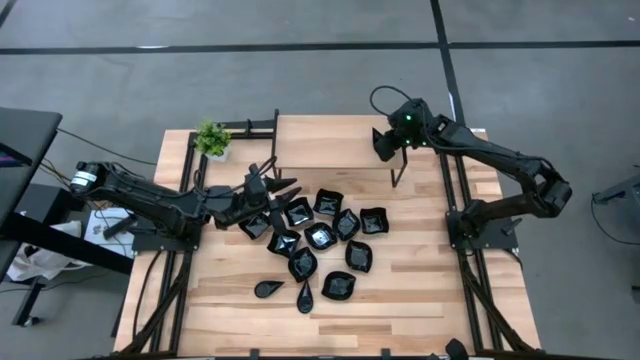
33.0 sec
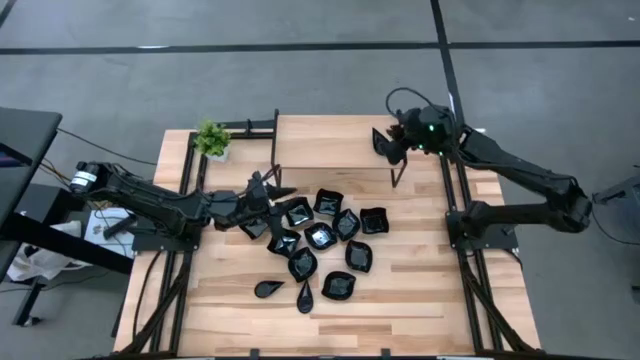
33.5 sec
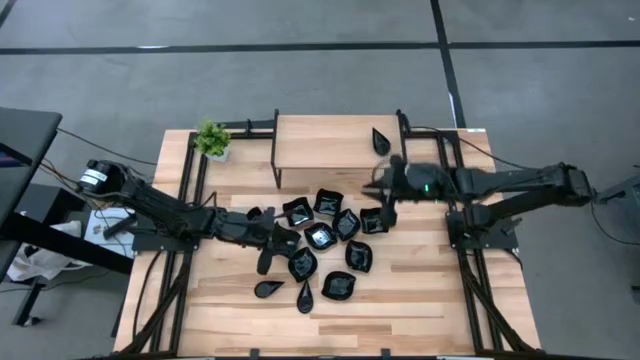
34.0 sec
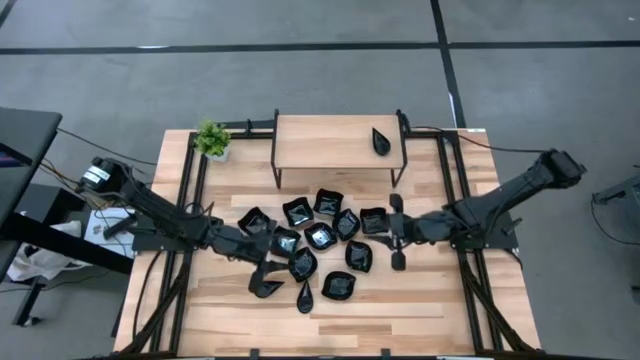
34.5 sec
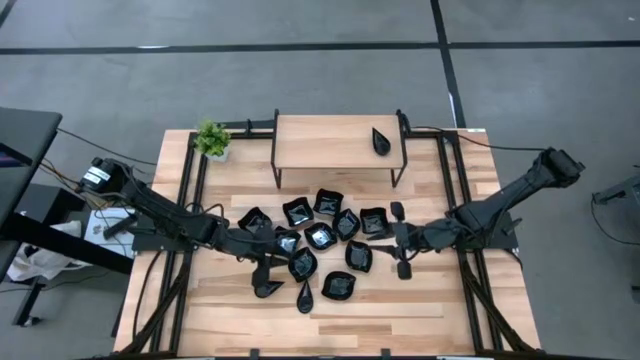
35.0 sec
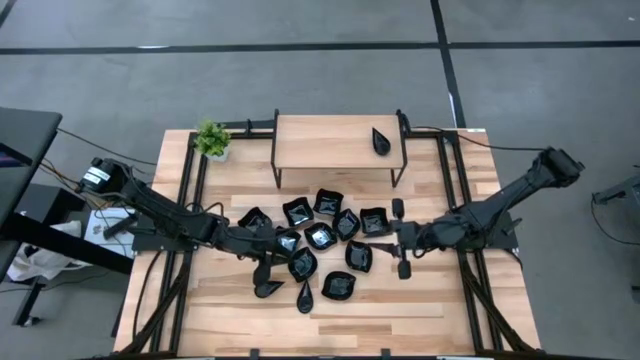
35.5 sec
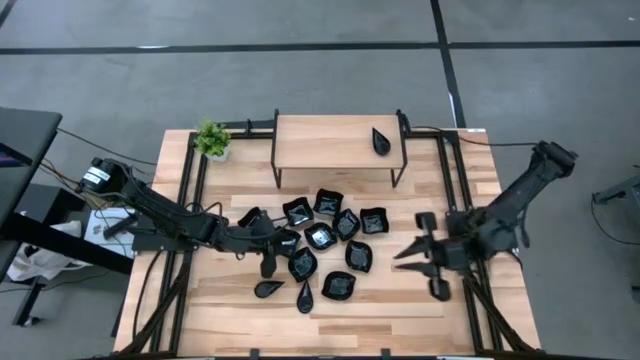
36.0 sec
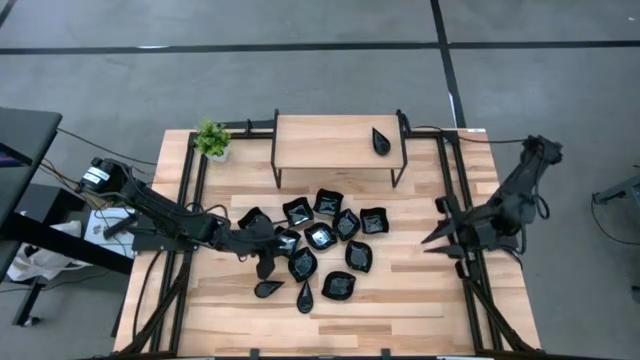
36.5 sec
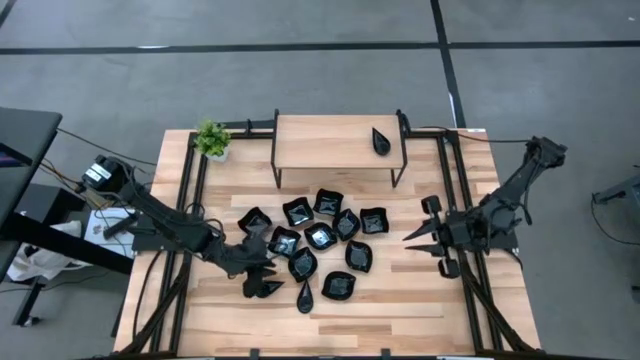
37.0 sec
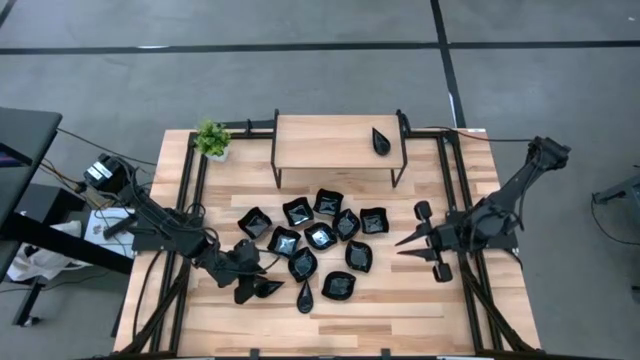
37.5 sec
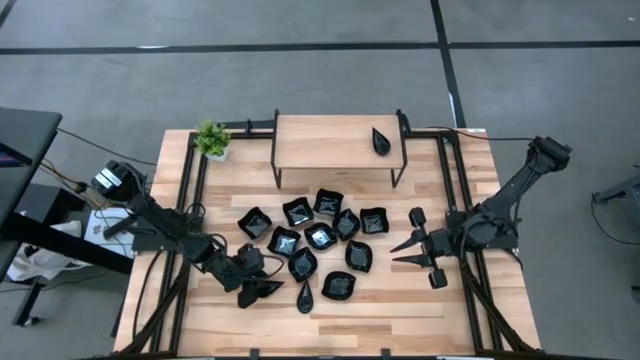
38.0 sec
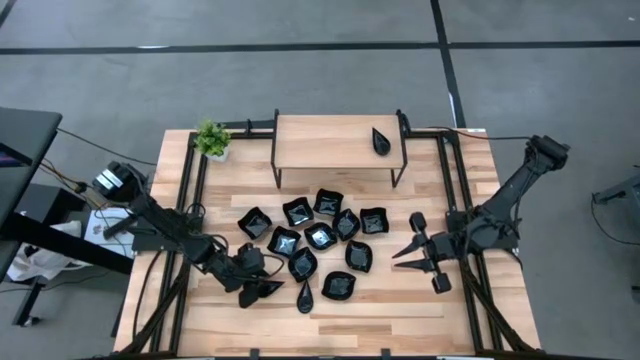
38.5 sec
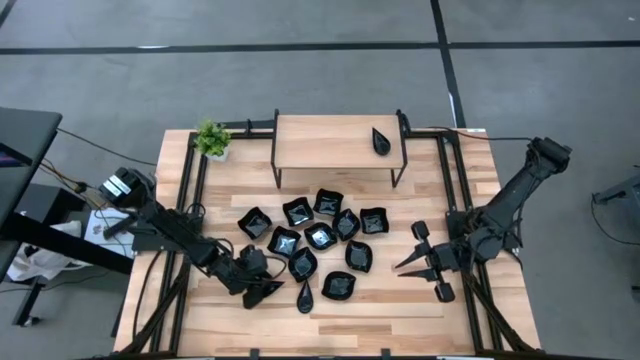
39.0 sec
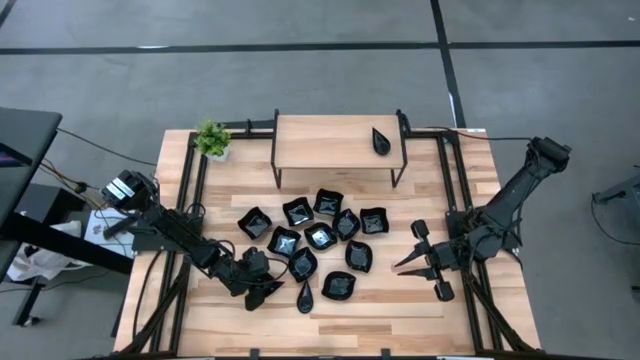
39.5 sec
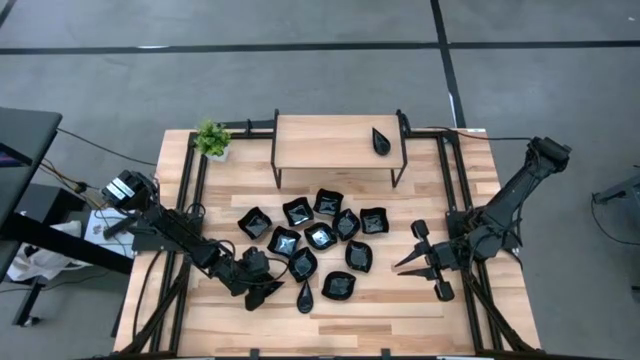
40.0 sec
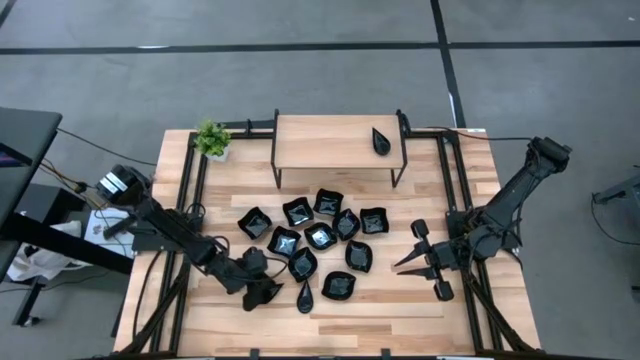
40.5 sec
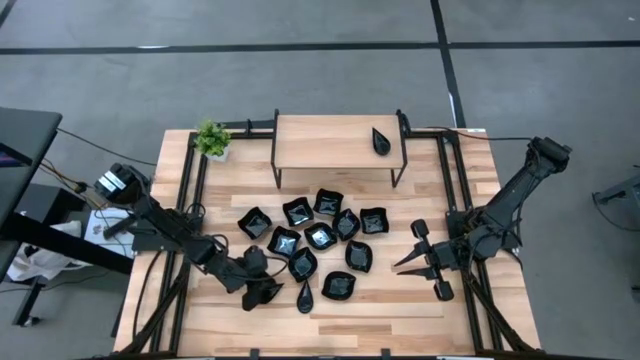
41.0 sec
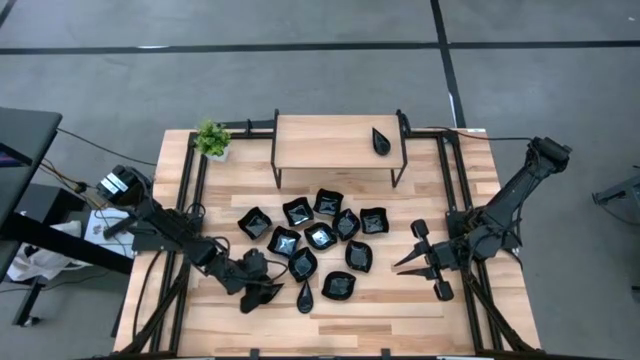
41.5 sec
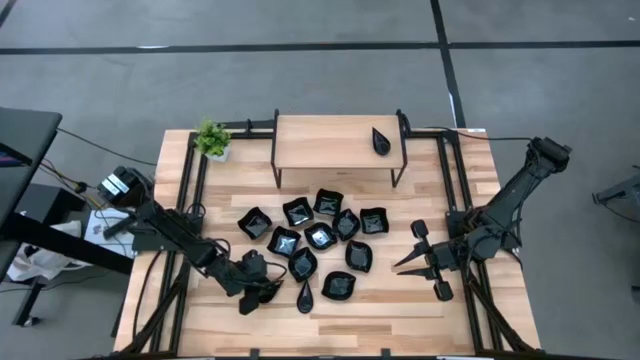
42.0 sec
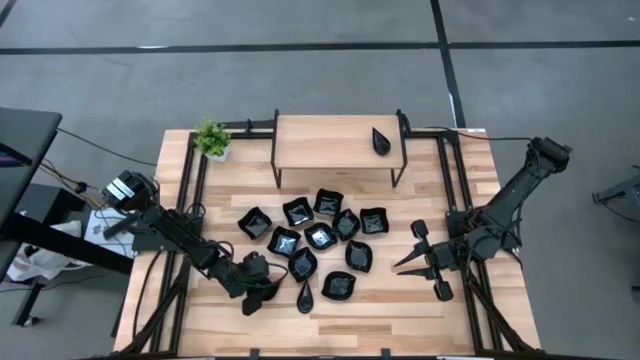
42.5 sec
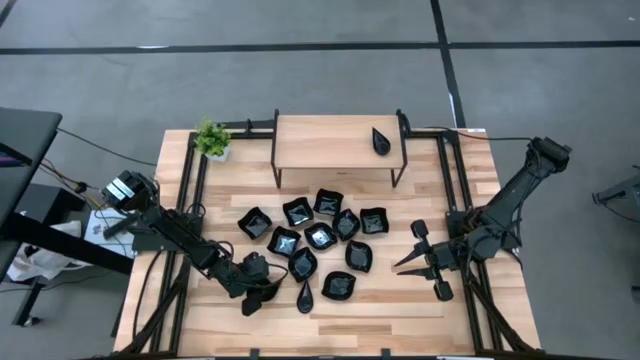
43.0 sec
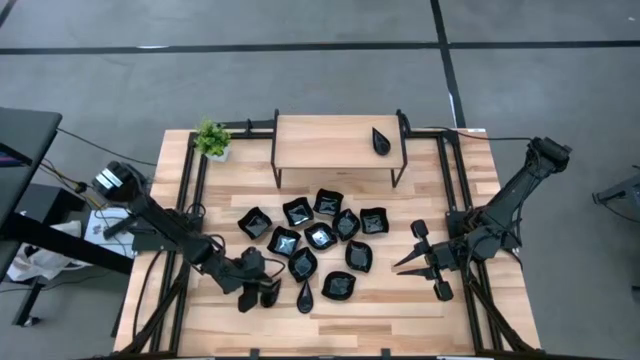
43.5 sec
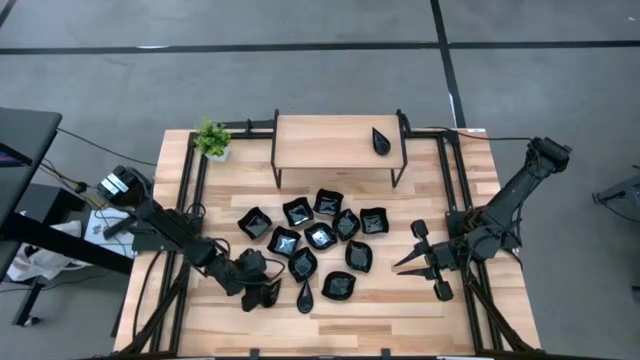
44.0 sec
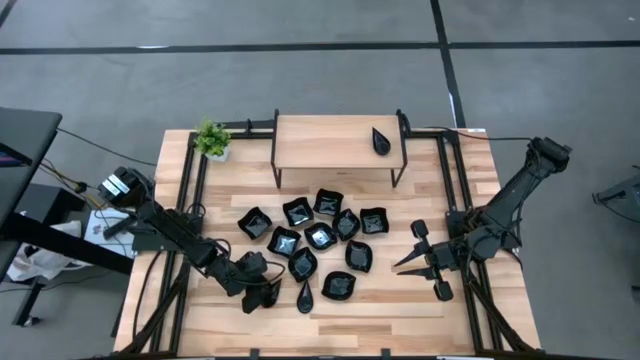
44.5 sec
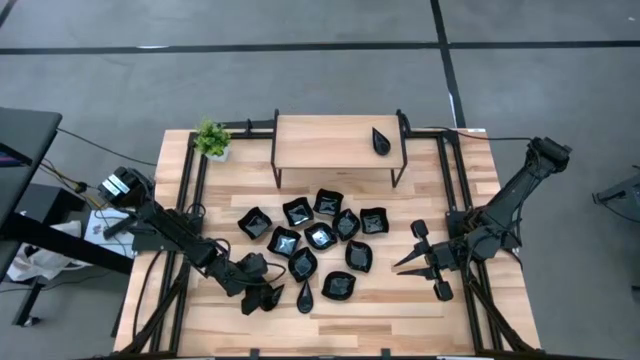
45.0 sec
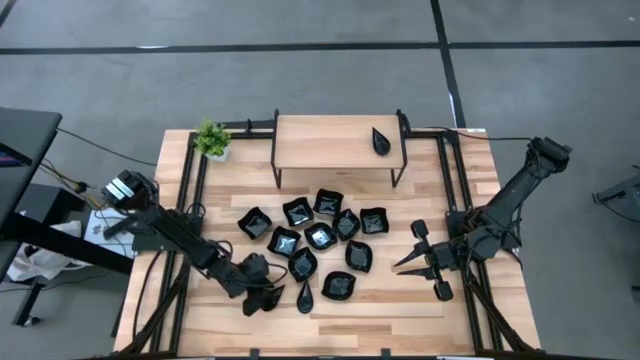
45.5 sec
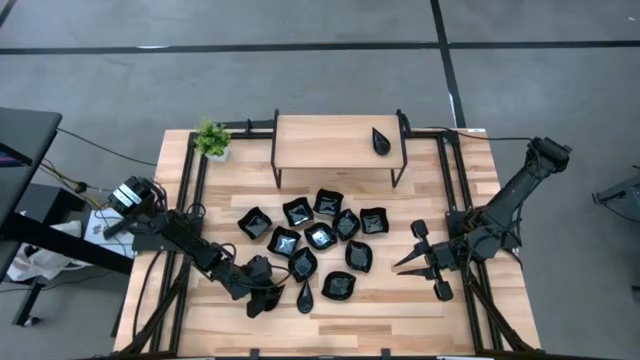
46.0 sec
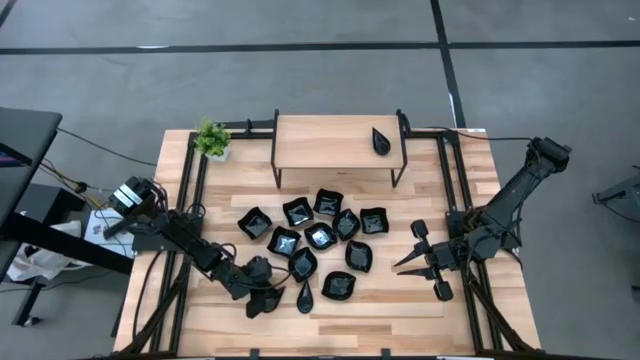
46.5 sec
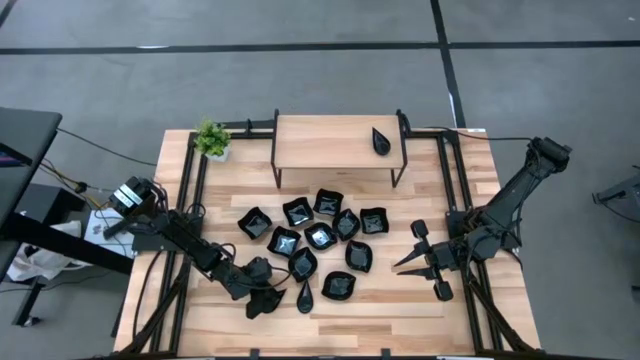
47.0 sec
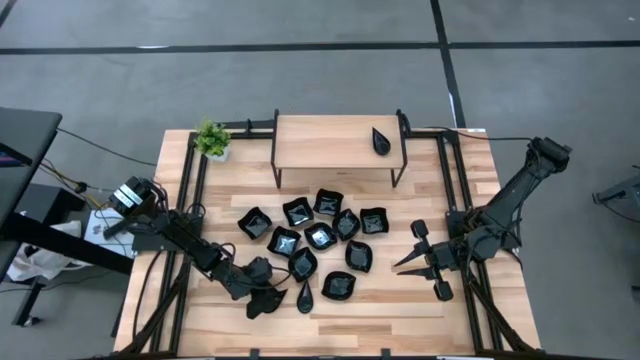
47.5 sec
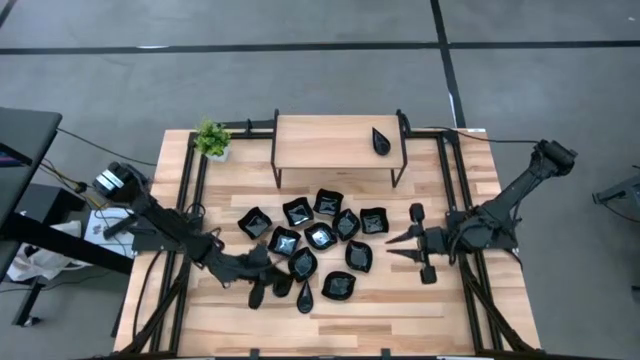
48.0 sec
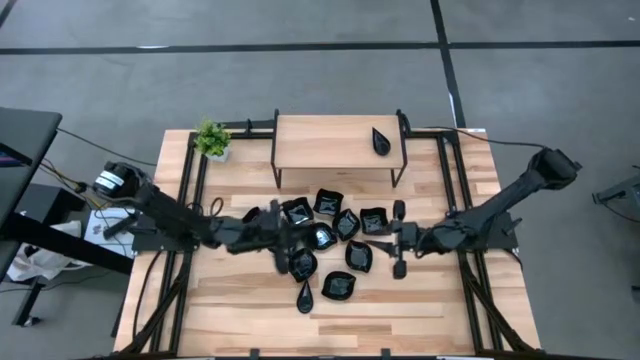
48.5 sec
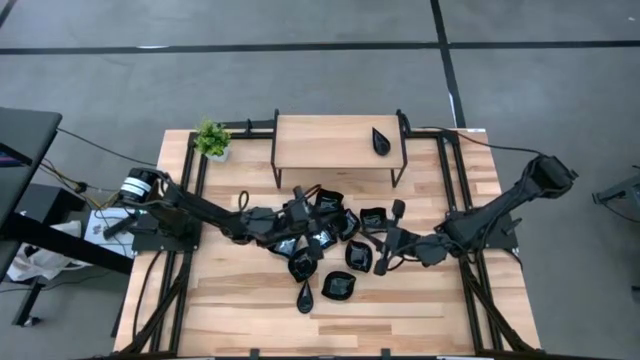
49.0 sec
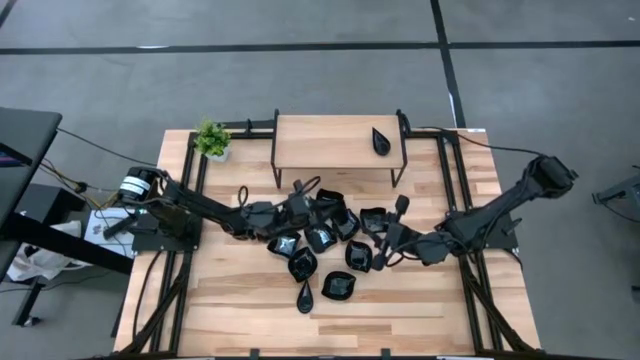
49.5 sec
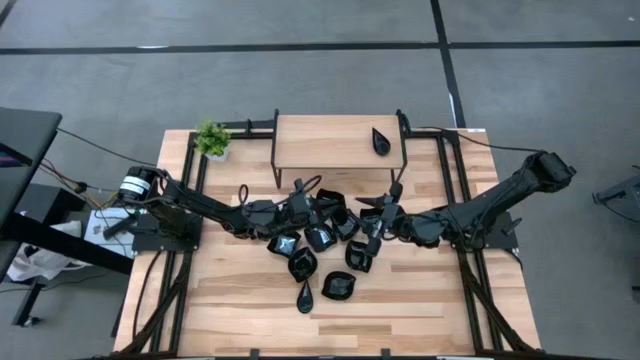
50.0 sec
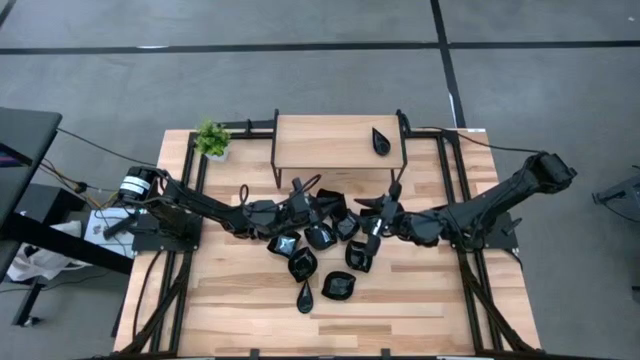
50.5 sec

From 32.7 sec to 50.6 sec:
Task: Pick & Place Mini shaped plates
Stack the black drop shaped plate on top of the black drop shaped plate on the shelf

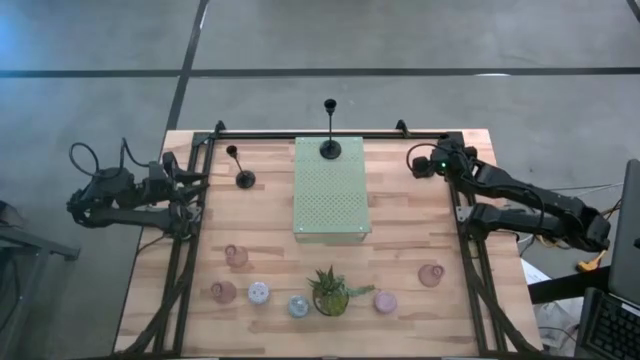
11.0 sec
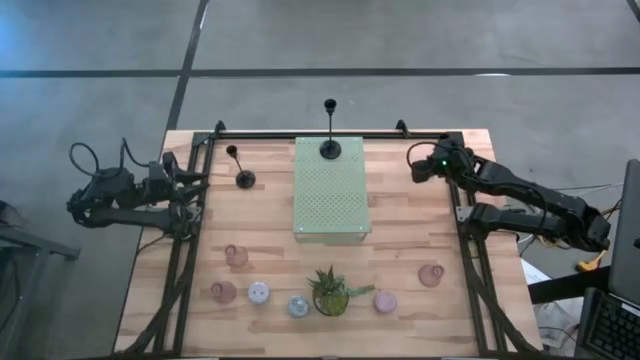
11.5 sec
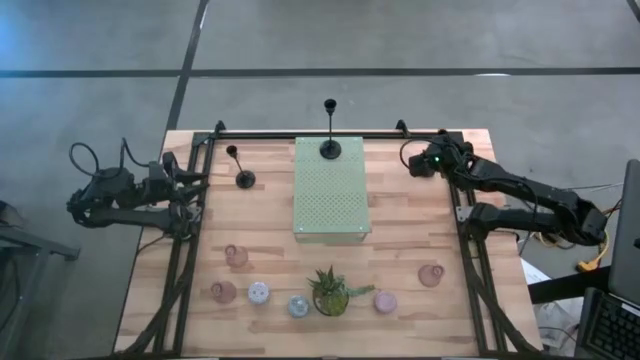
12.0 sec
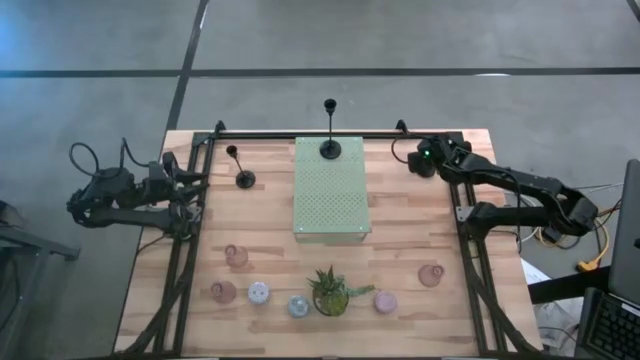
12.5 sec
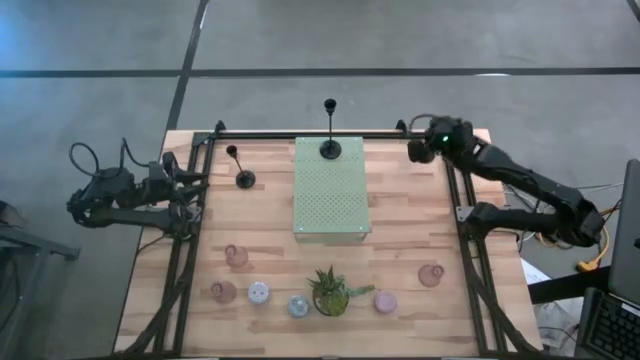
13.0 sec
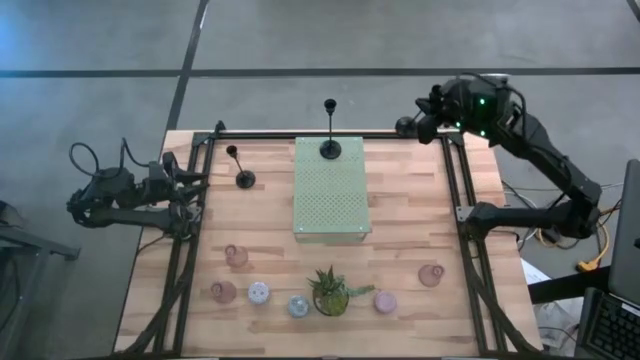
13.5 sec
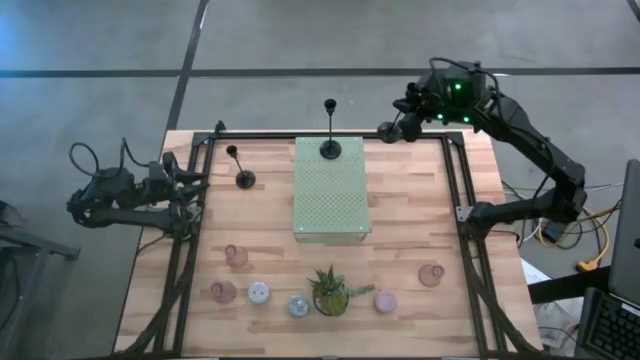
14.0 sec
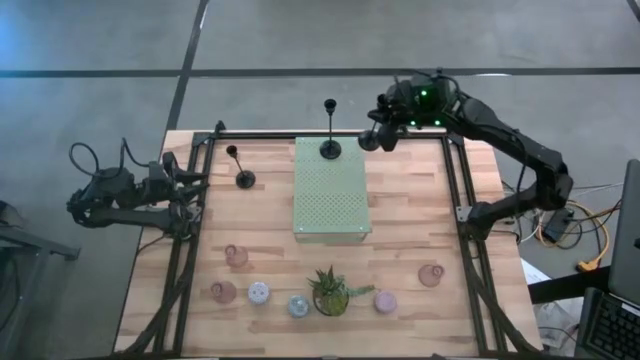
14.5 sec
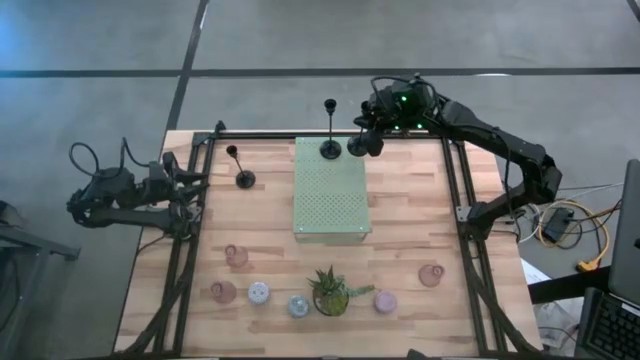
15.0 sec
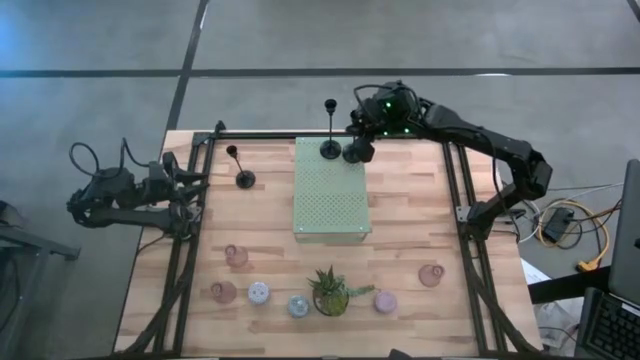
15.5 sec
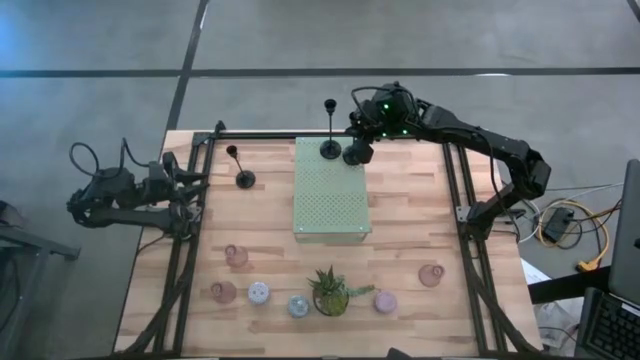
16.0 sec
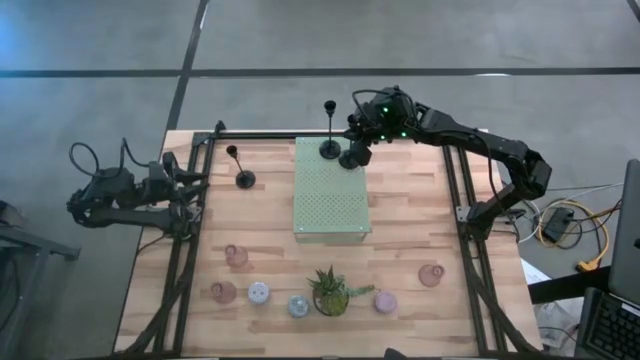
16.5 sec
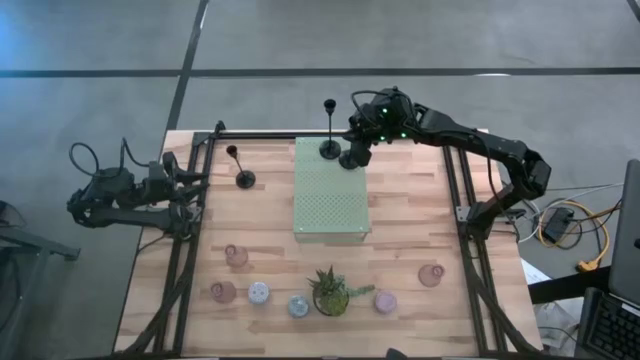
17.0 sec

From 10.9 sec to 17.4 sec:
Task: Pick & Place candle stick holders
Put the right black candle holder on the shelf
